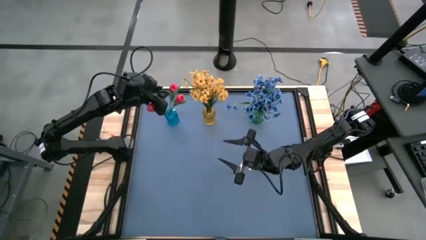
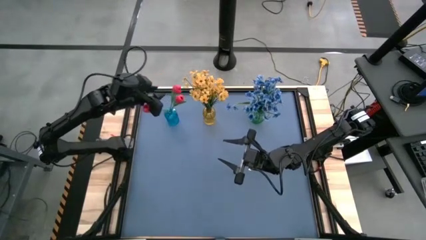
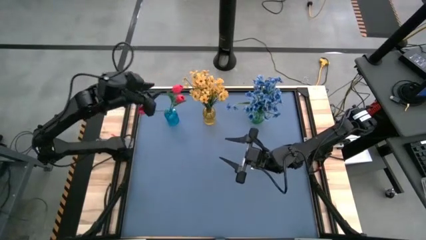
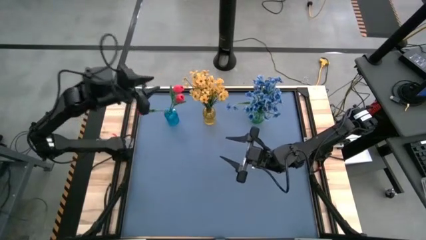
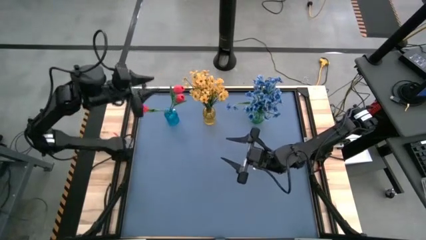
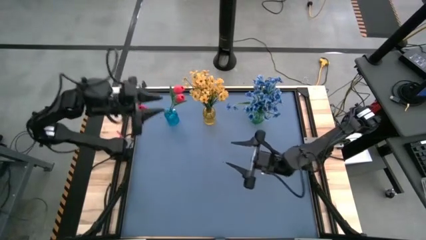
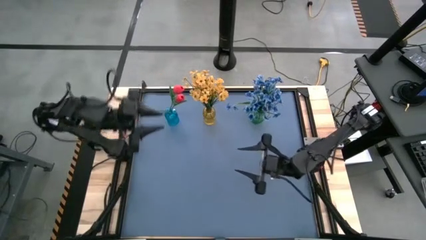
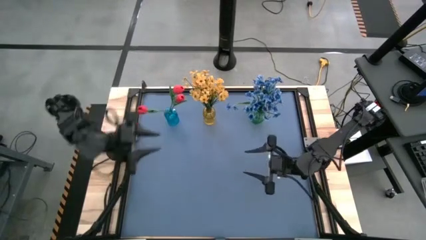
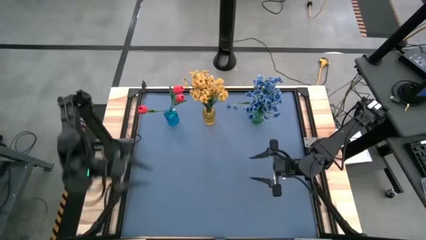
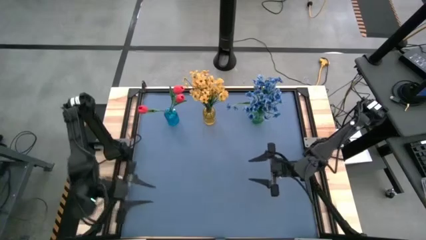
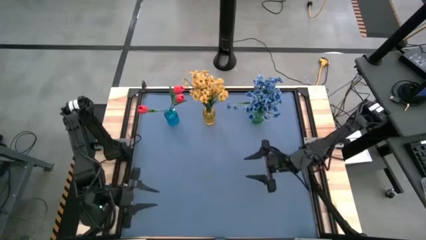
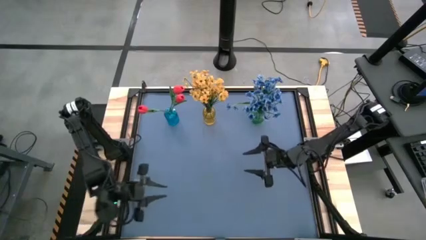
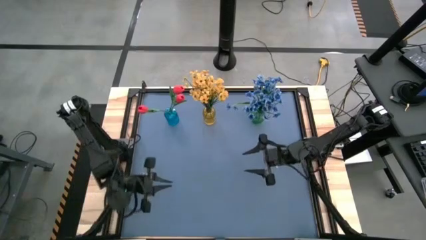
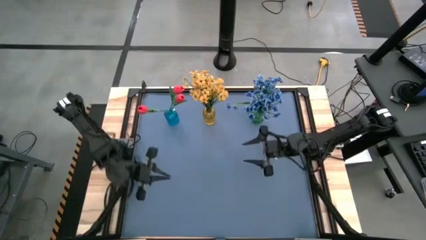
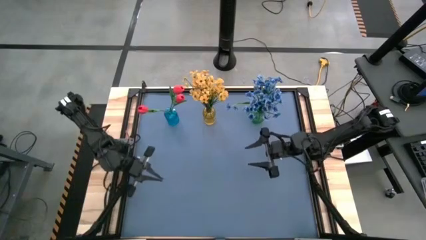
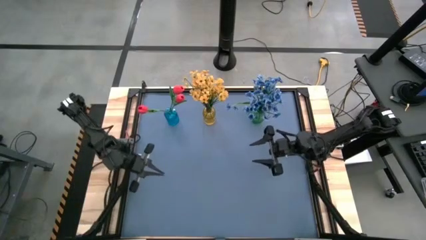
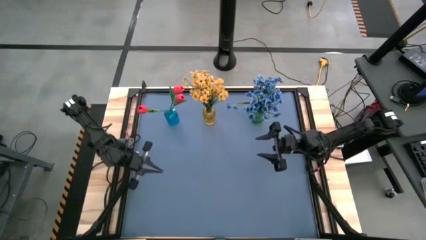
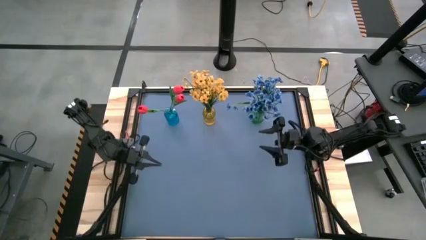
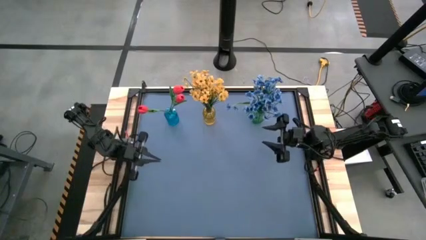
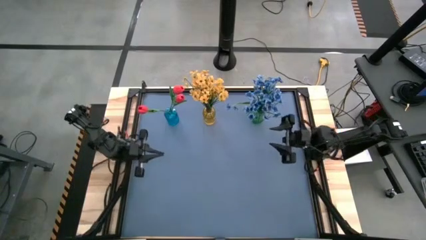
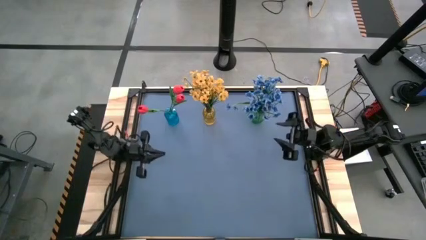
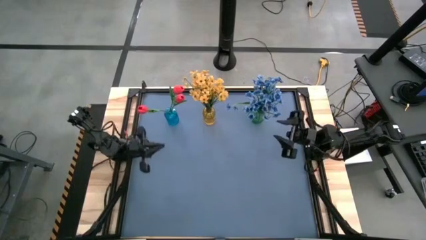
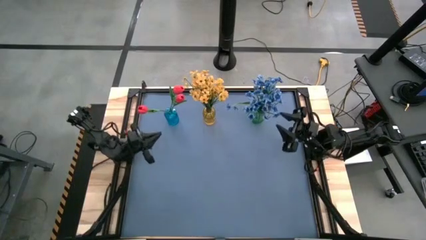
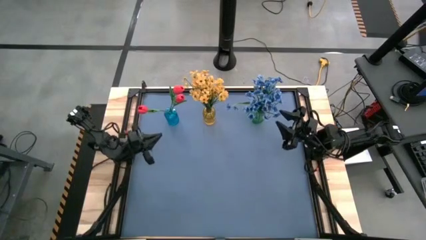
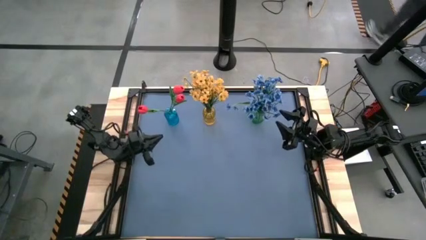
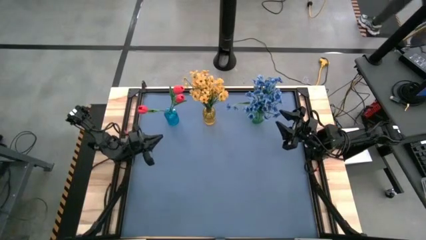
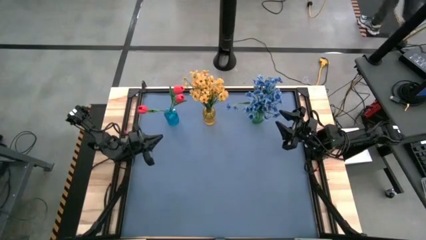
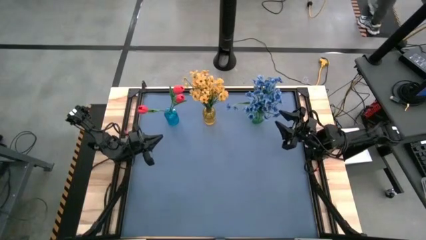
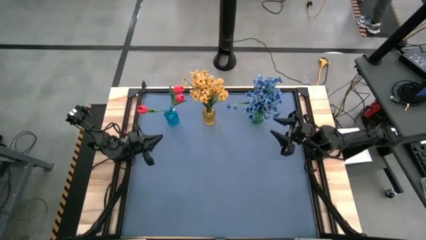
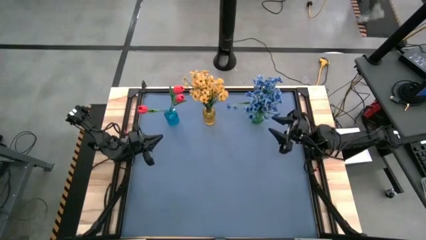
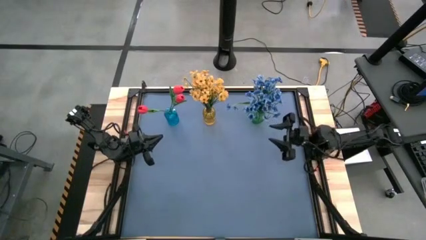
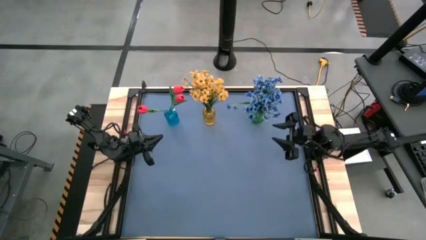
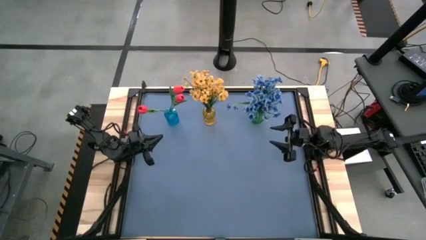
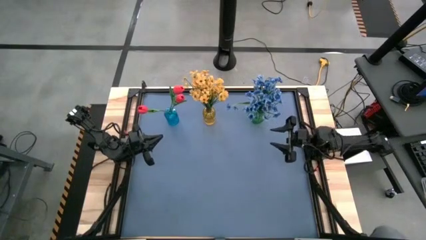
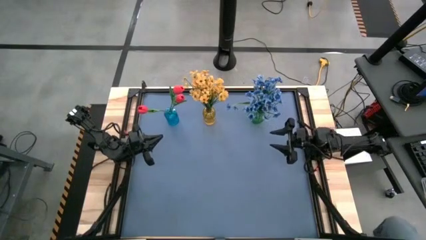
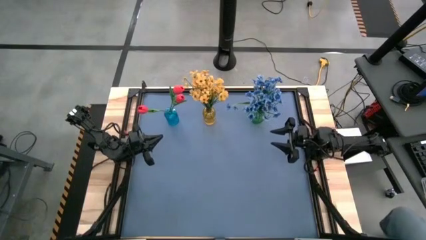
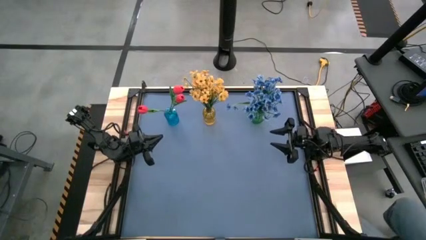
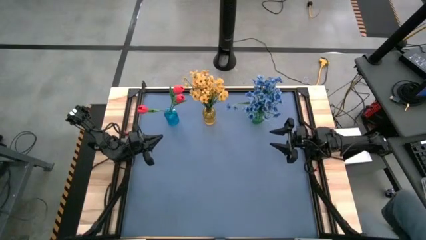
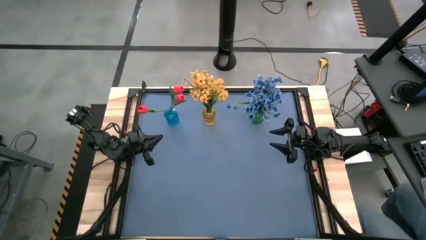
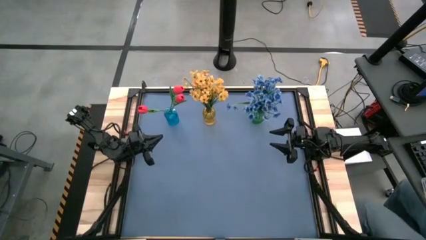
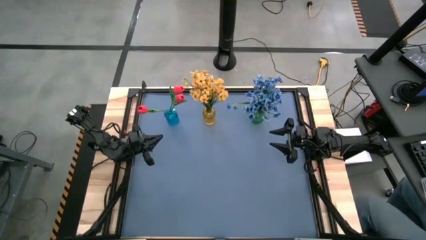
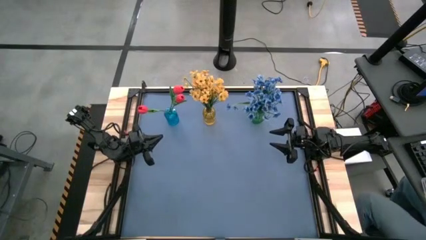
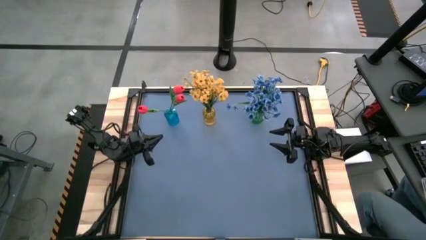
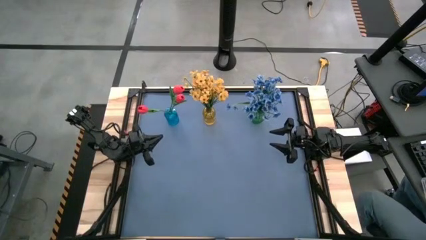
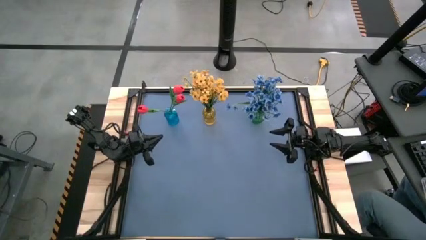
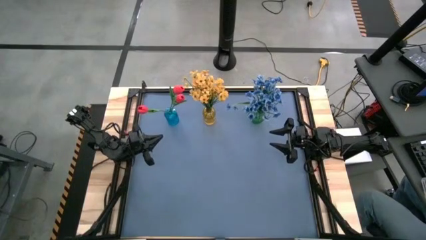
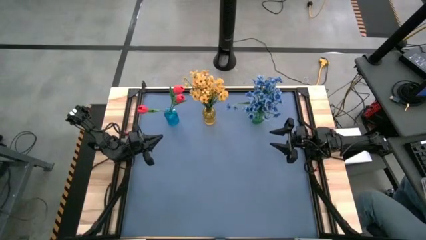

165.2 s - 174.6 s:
Task: Sort flowers into vase by color
Return to Home Position
